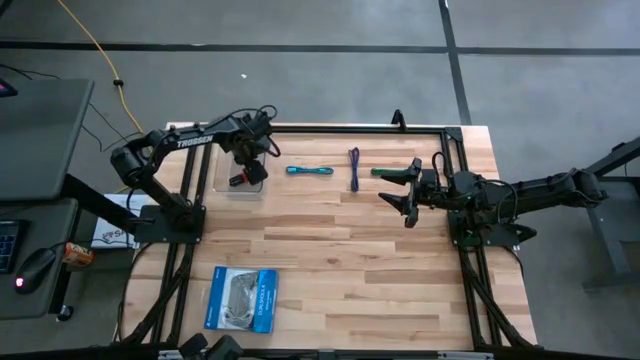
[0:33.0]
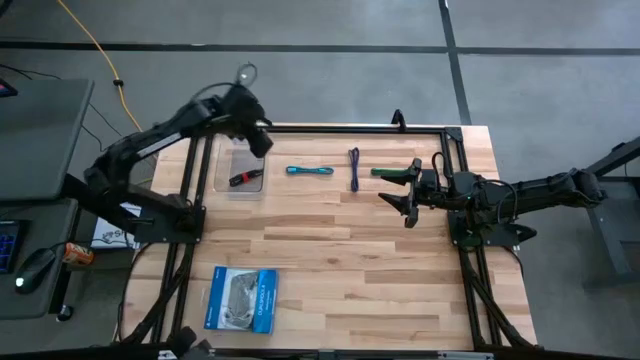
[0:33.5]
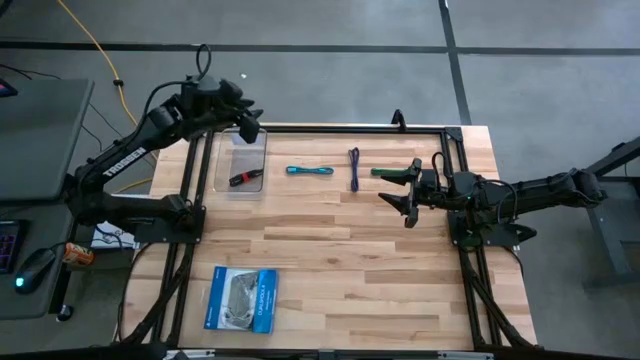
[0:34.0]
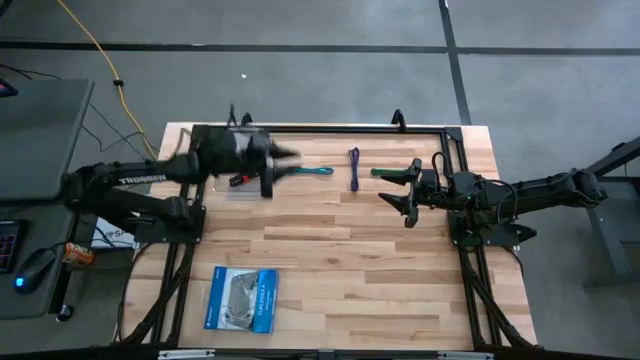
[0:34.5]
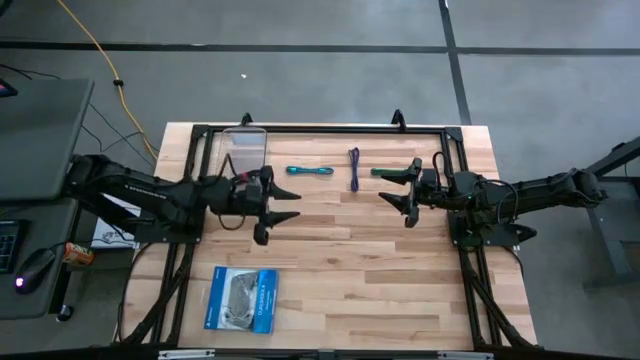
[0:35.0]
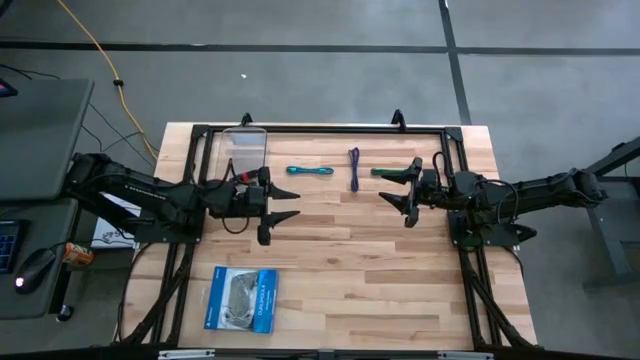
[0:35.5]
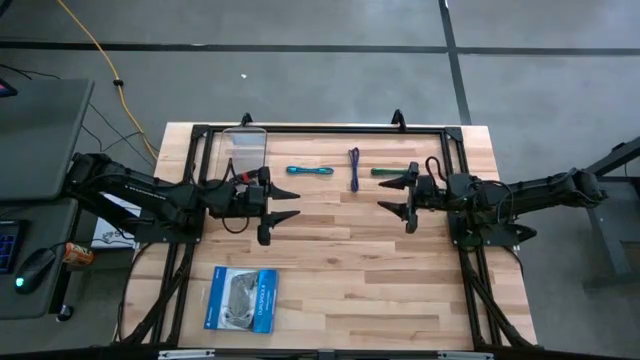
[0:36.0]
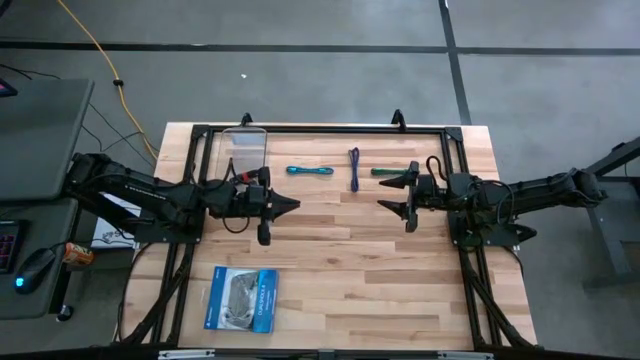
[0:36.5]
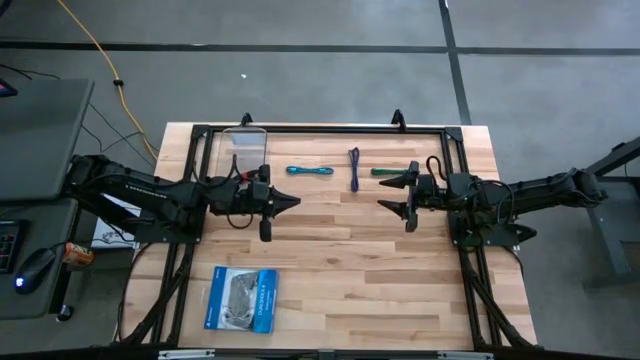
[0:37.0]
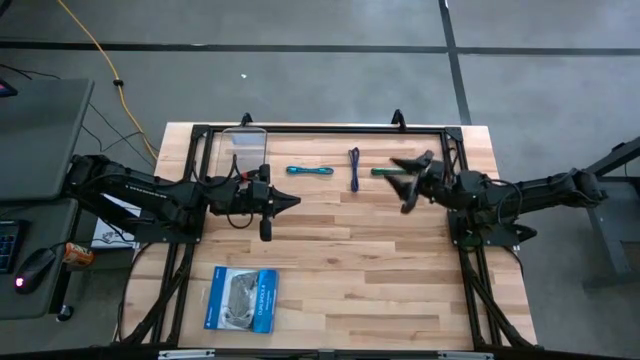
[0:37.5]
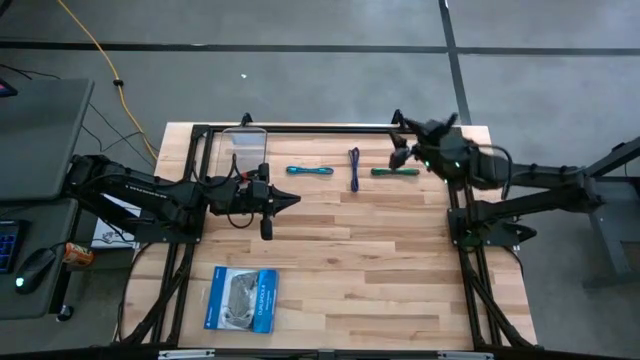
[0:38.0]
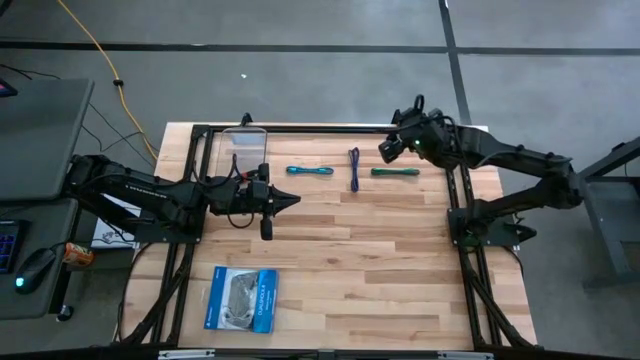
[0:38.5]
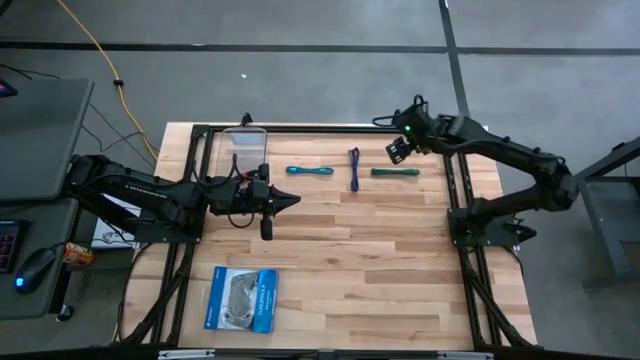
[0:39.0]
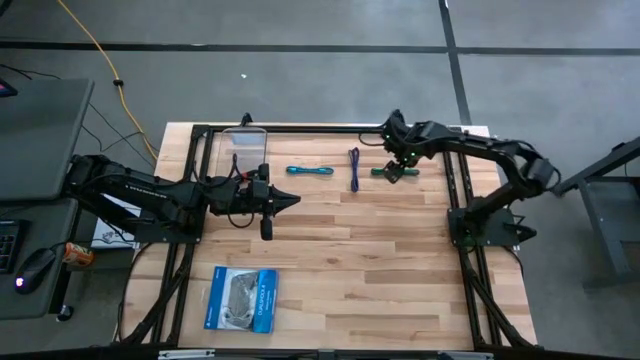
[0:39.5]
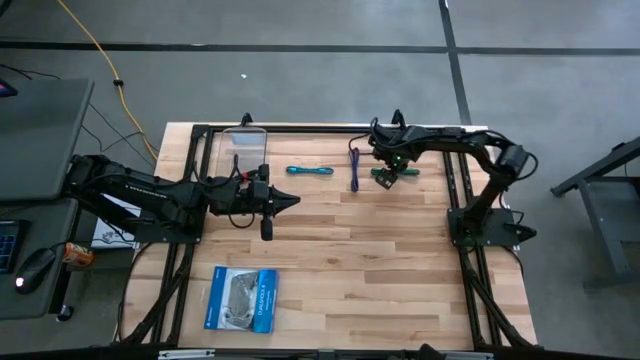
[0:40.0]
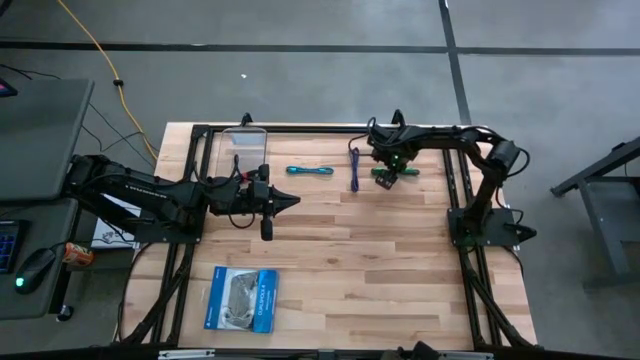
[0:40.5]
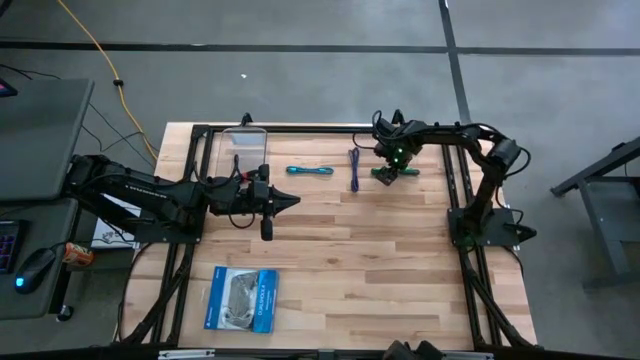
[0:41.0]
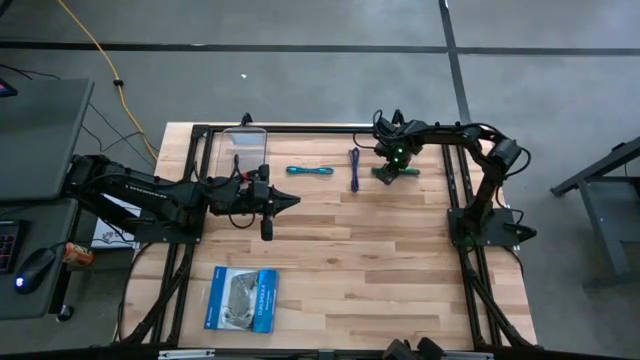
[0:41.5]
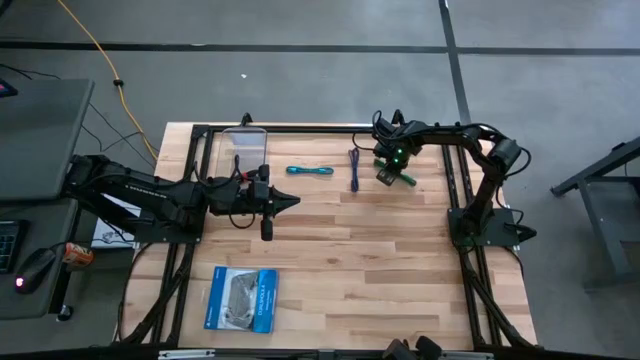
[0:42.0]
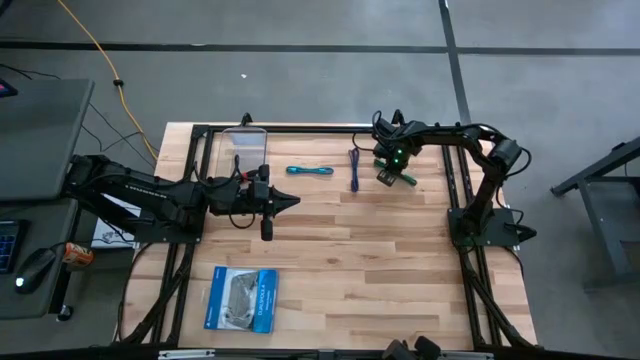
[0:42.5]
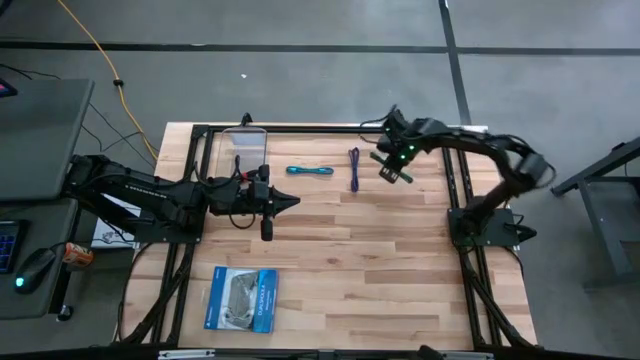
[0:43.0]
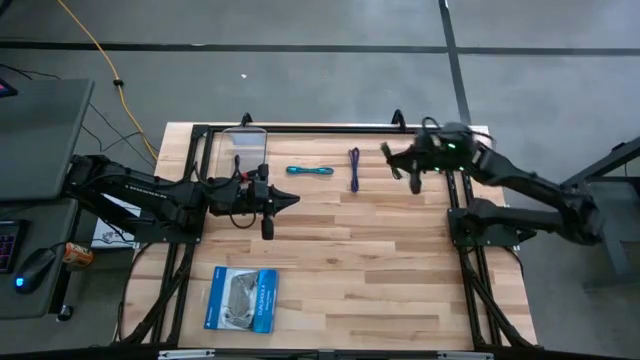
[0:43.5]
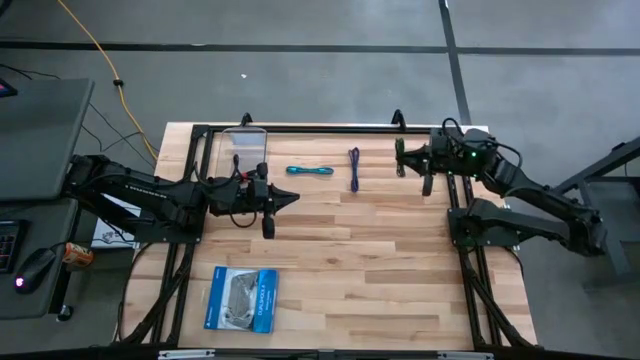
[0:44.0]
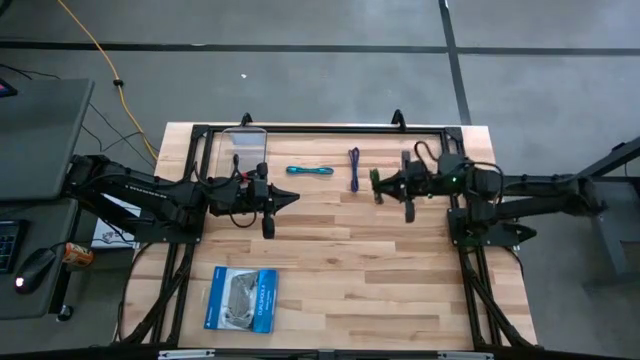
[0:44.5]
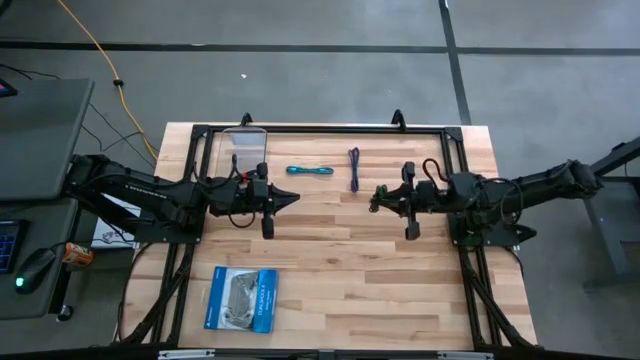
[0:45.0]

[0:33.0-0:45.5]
Task: Pick and place USB-C Cables
Put the green USB cable into the transparent bin

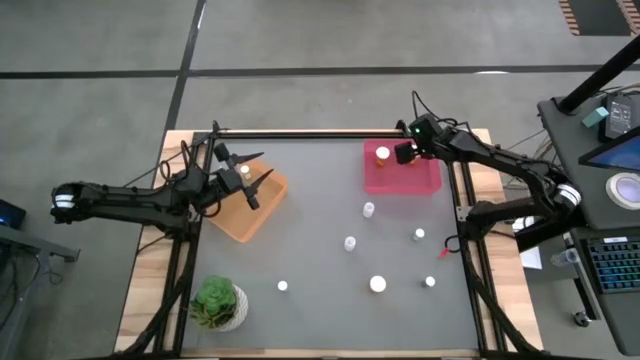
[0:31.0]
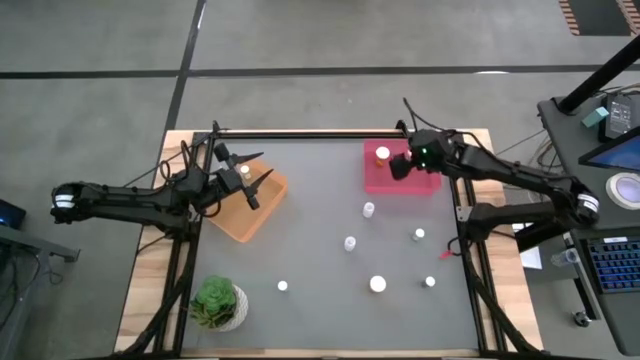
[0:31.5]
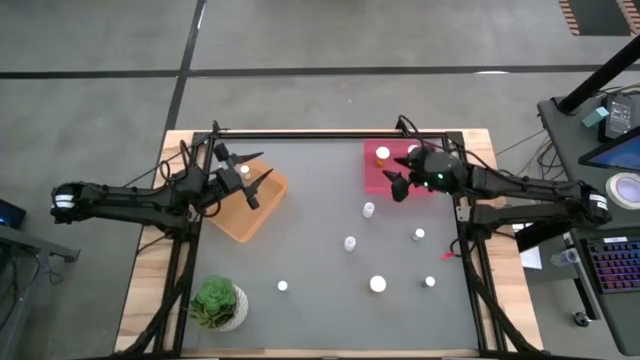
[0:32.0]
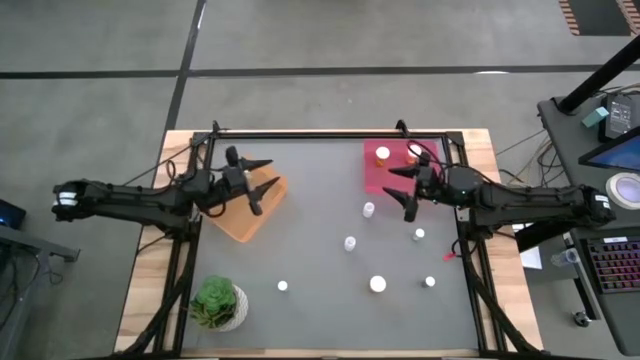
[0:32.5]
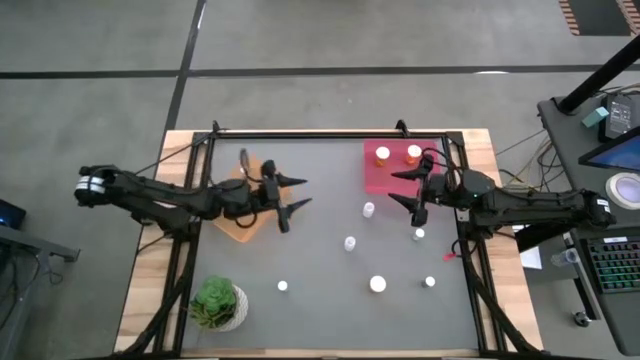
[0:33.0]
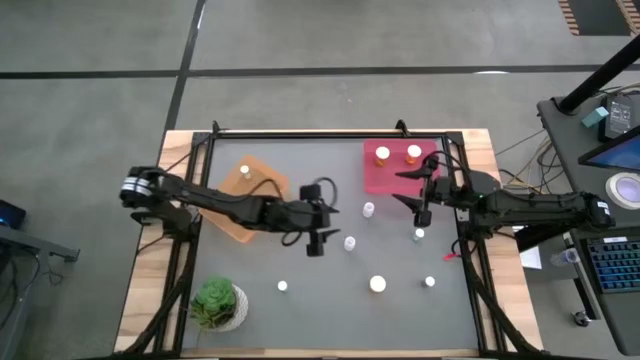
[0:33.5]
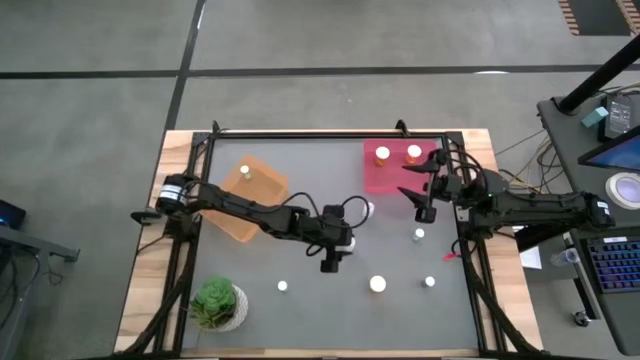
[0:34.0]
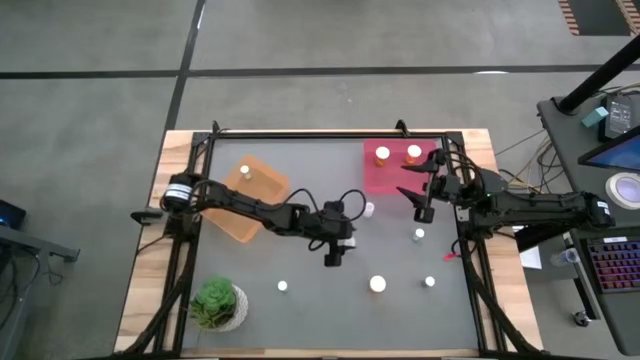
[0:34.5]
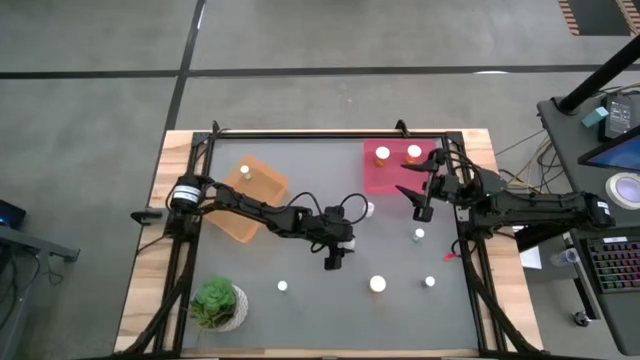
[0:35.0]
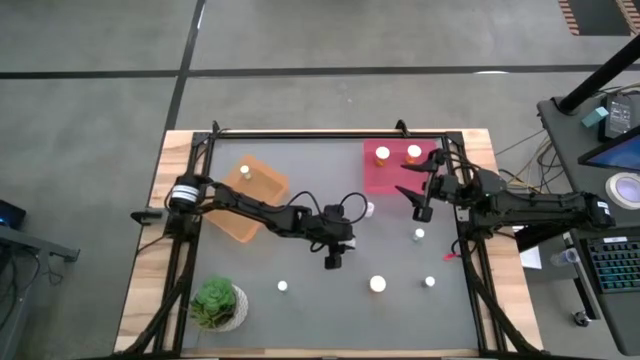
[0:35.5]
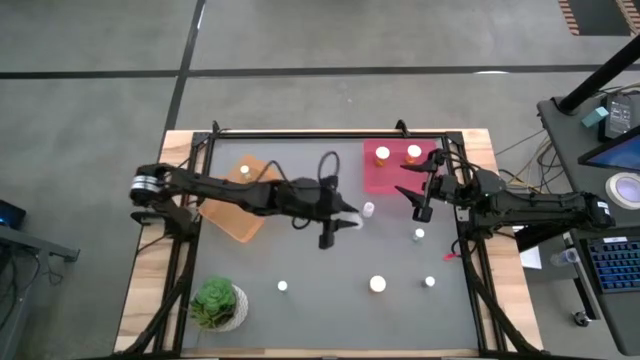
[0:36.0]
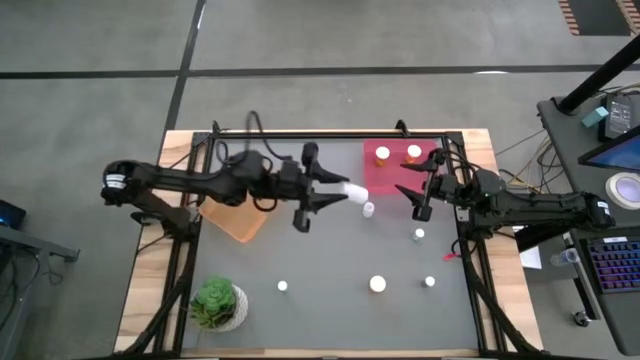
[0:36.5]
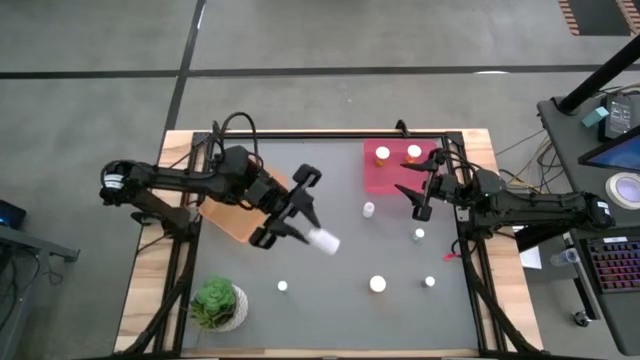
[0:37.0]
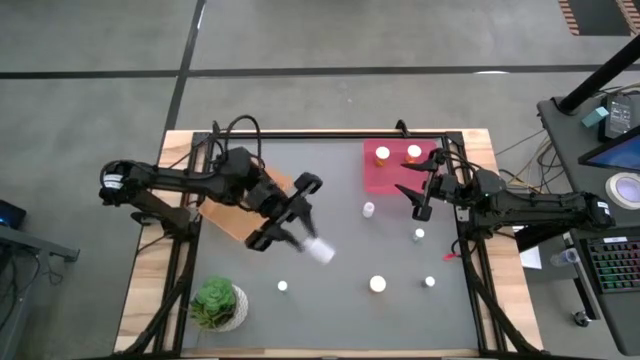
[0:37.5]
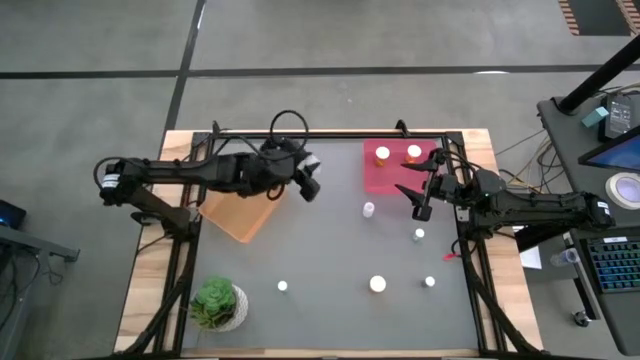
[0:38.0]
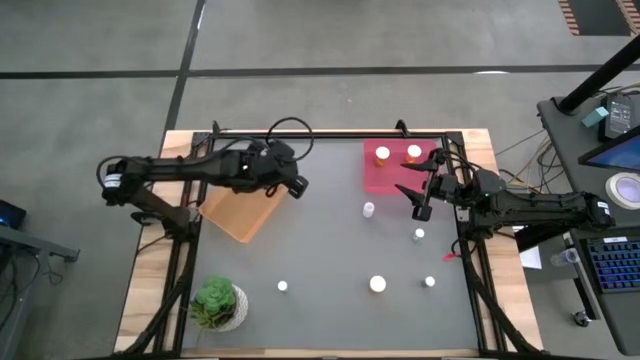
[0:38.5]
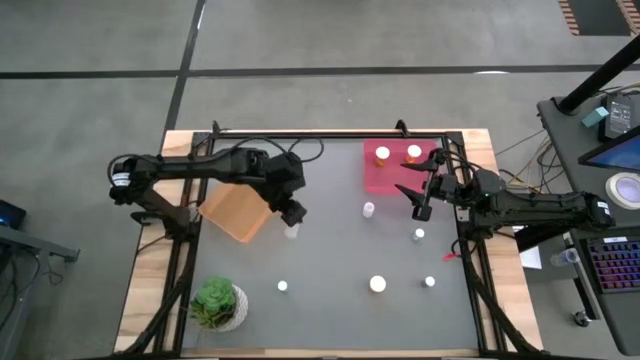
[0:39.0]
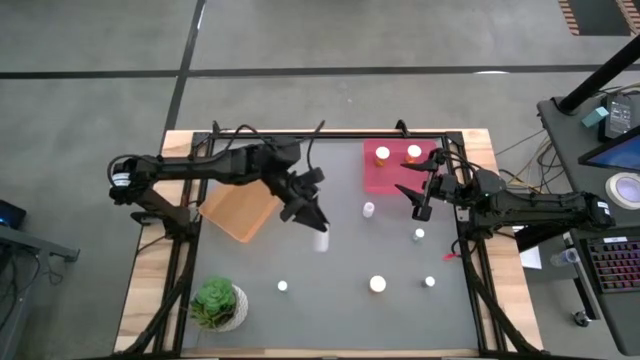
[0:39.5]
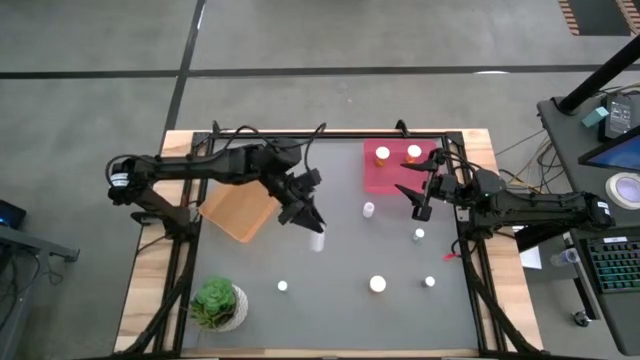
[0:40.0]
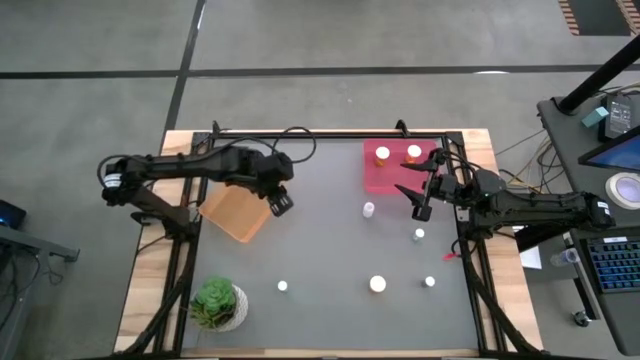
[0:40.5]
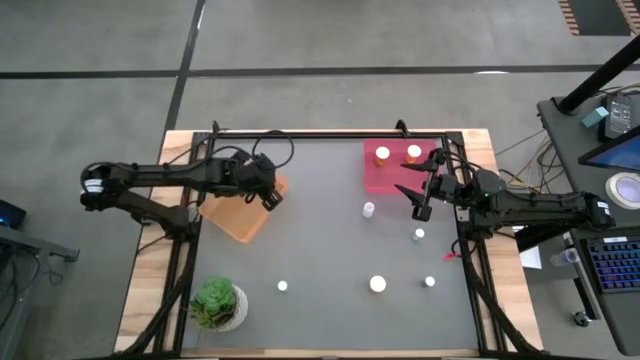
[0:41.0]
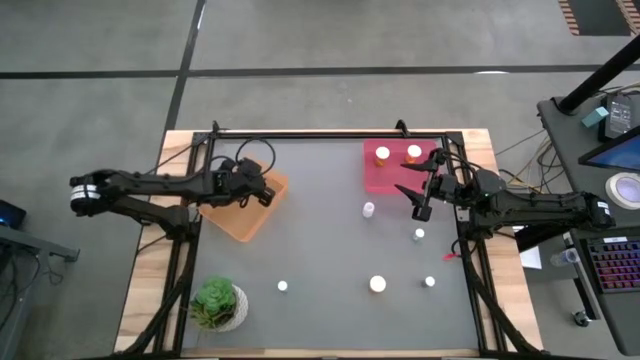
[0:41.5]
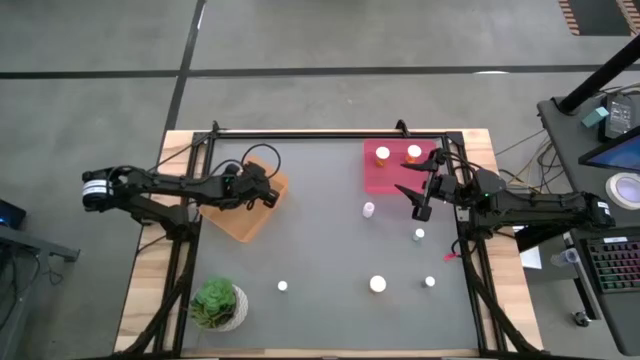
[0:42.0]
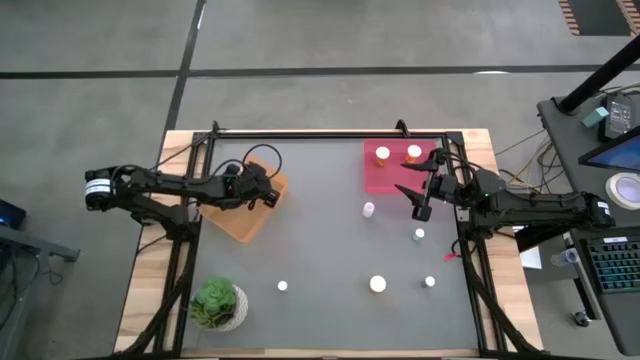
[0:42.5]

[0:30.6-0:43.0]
Task: Pick and place medicine bottles into bin by pill shape (circle, oval)
Put the transparent tablet bottle into the orange bin
